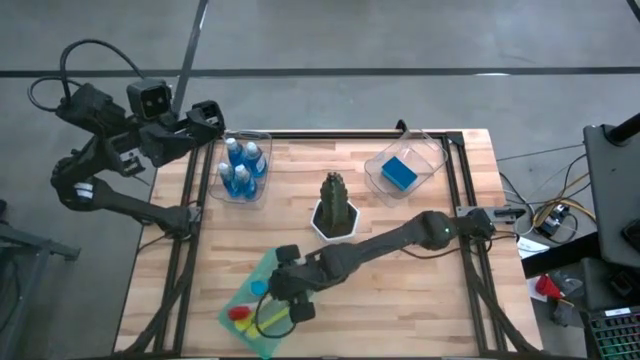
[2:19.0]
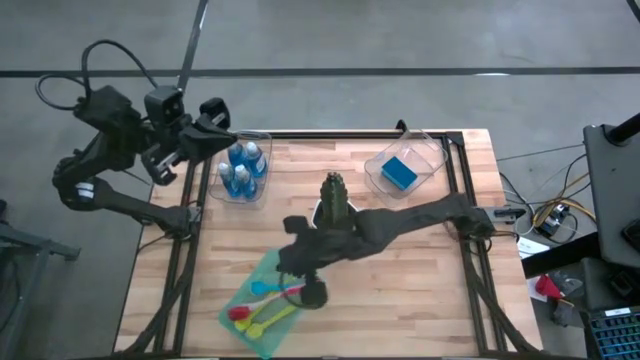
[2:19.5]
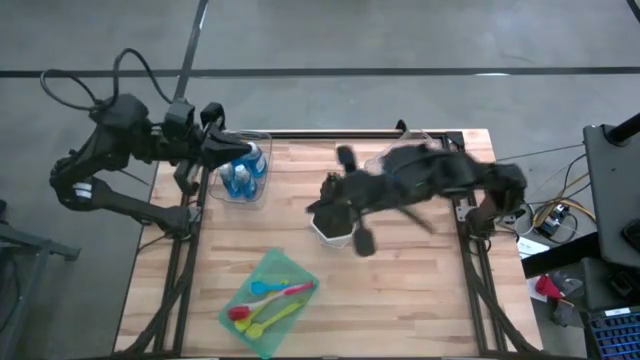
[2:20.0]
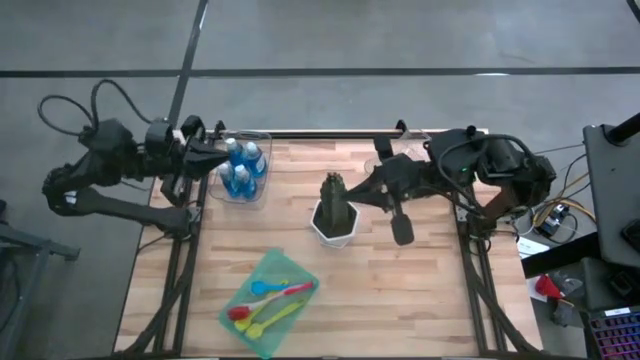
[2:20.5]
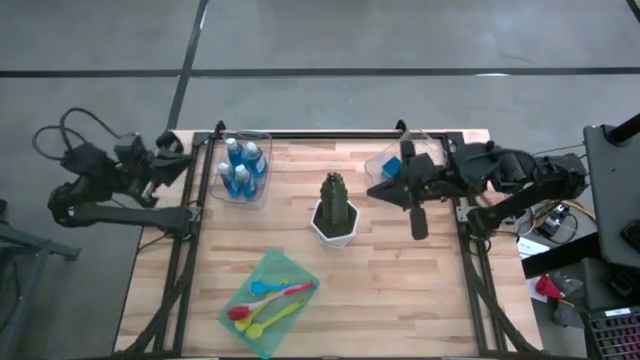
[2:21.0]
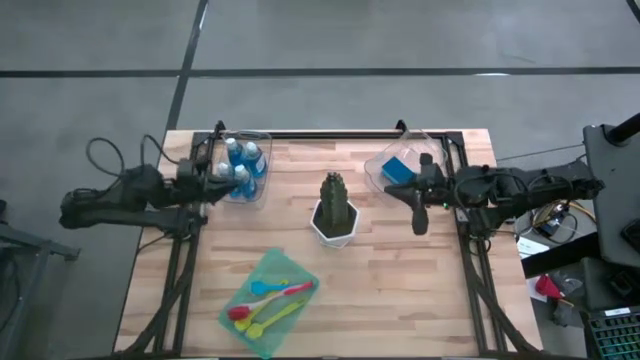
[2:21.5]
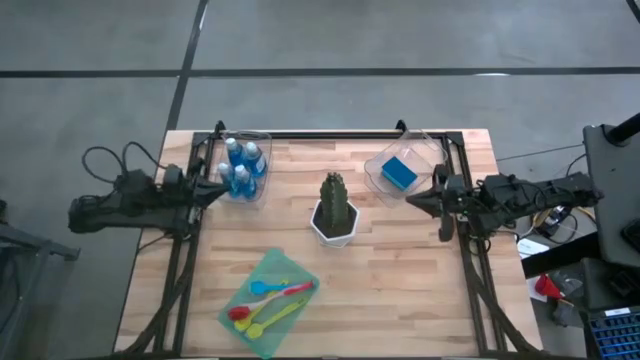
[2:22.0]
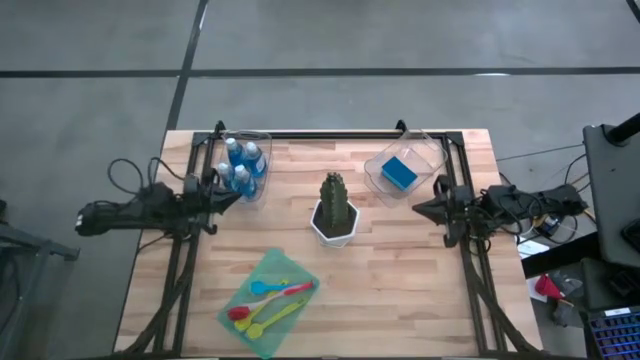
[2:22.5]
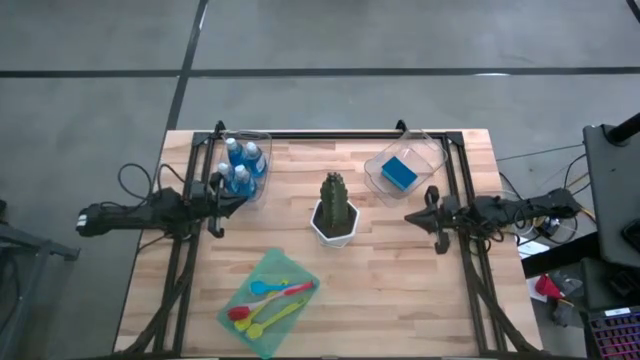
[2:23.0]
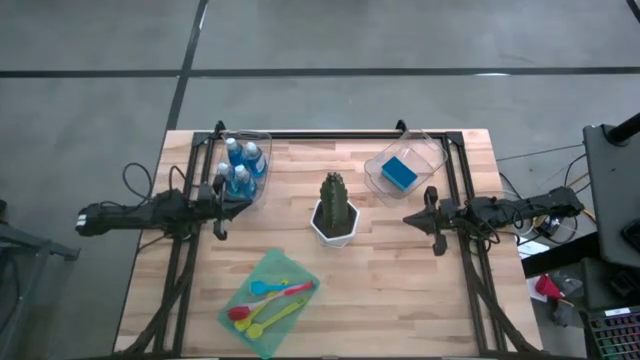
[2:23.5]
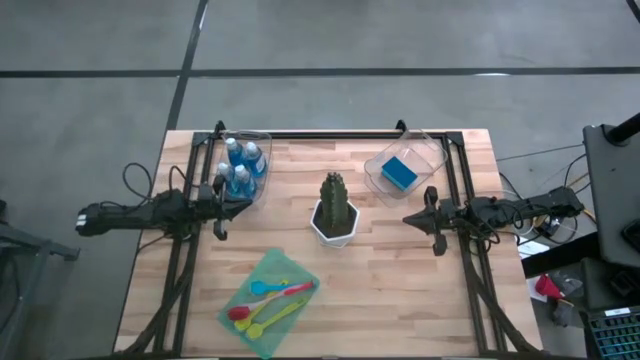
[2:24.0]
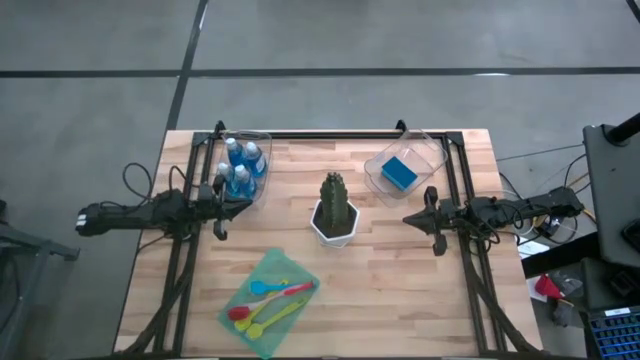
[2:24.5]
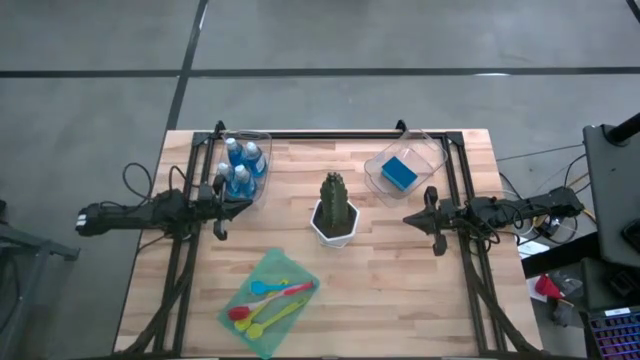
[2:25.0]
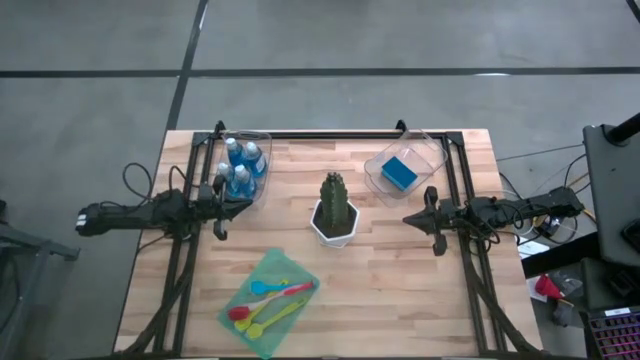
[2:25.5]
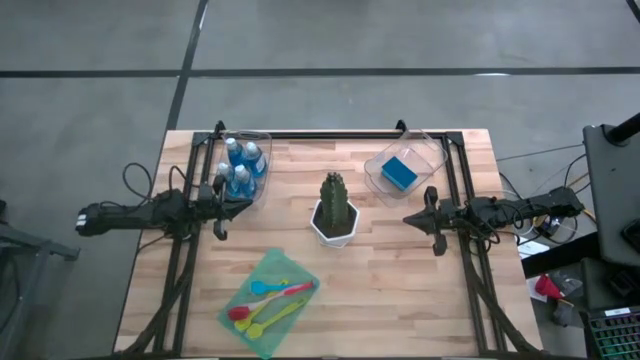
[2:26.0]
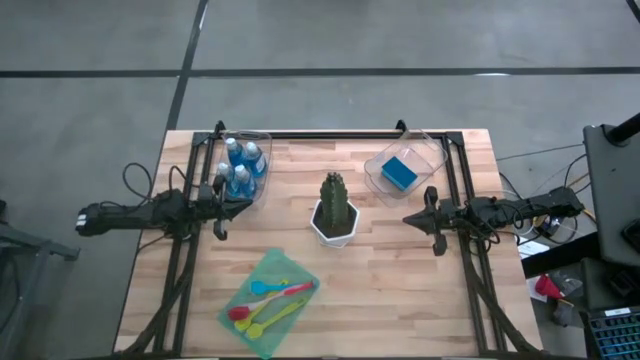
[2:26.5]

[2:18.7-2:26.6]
Task: Pick & Place Kitchen Sink Supplies
Return to Home Position

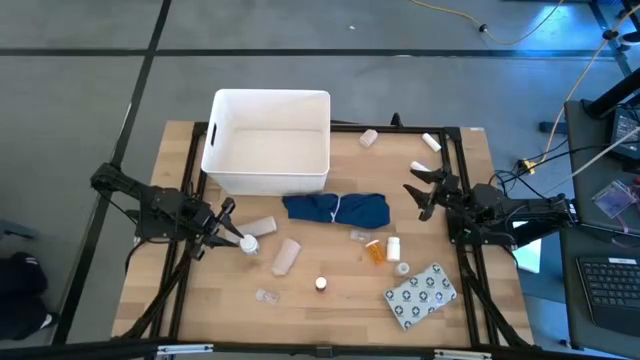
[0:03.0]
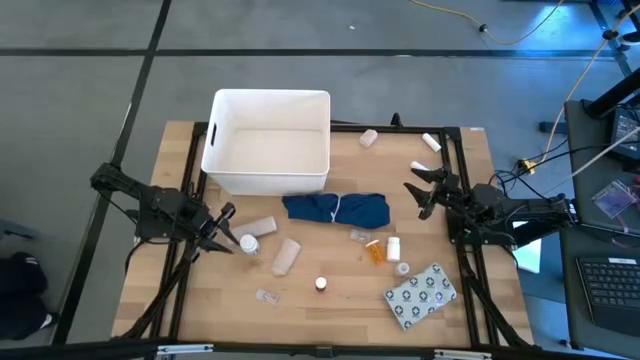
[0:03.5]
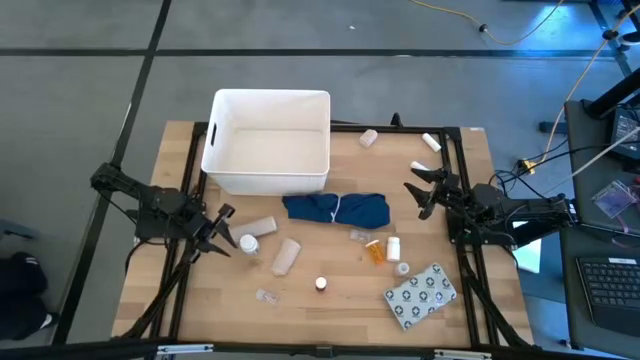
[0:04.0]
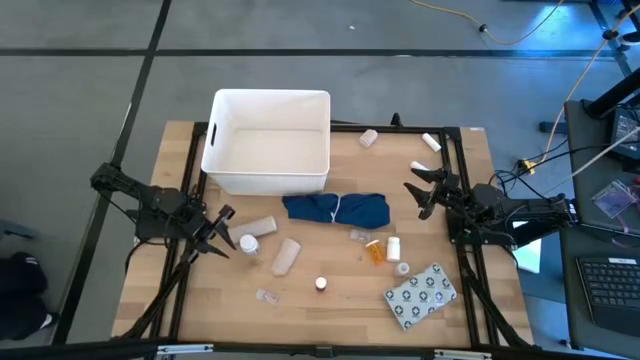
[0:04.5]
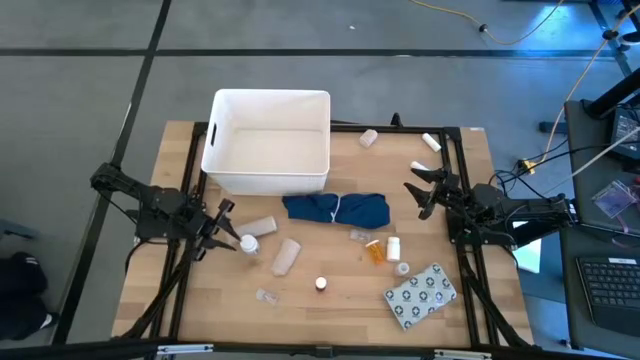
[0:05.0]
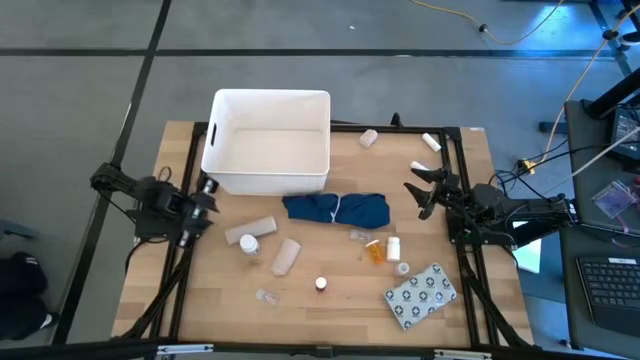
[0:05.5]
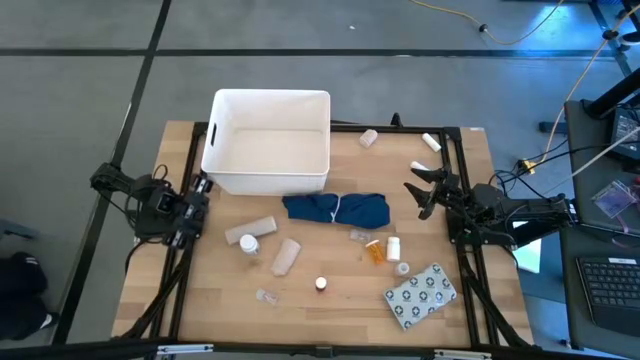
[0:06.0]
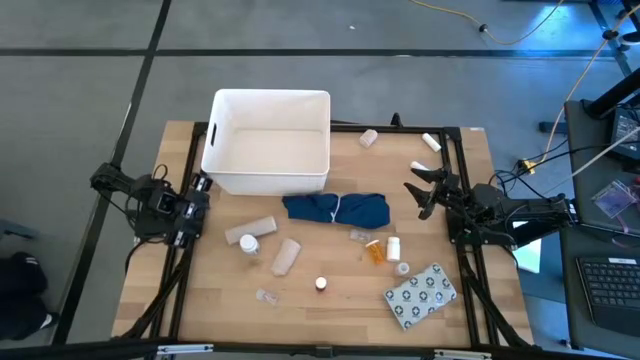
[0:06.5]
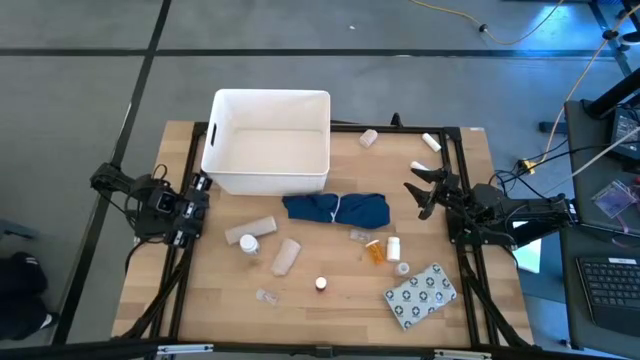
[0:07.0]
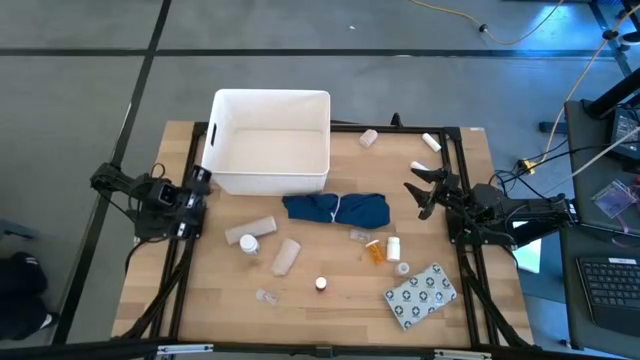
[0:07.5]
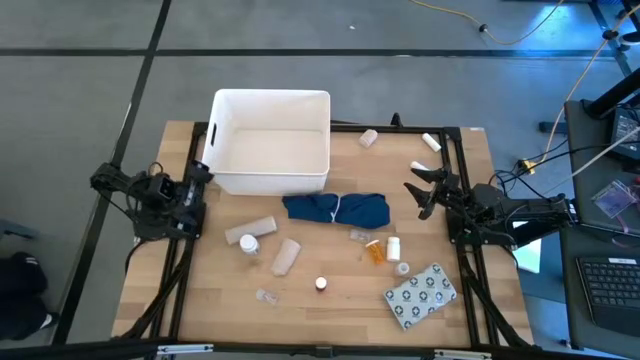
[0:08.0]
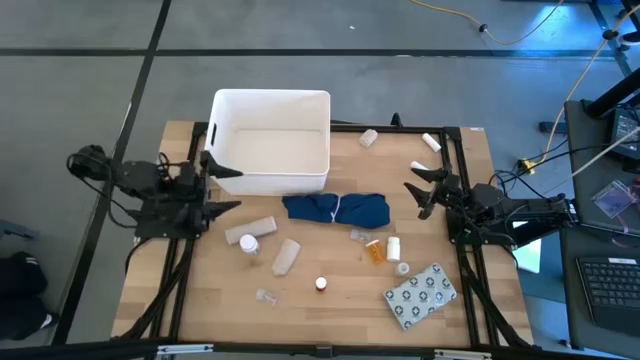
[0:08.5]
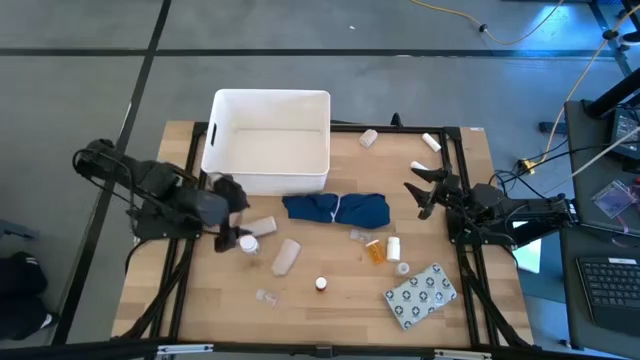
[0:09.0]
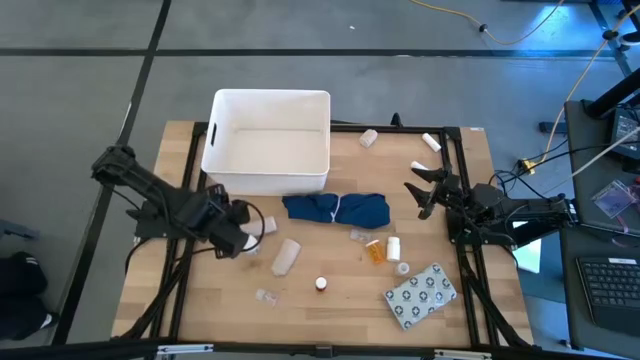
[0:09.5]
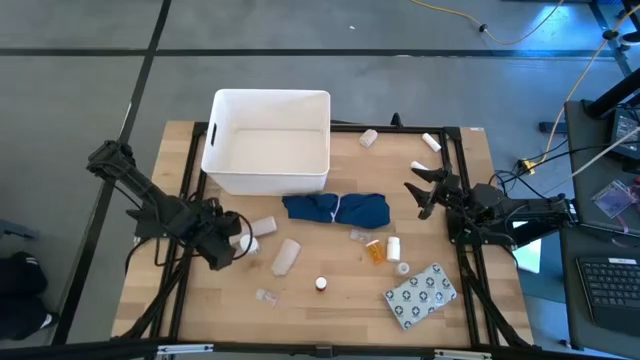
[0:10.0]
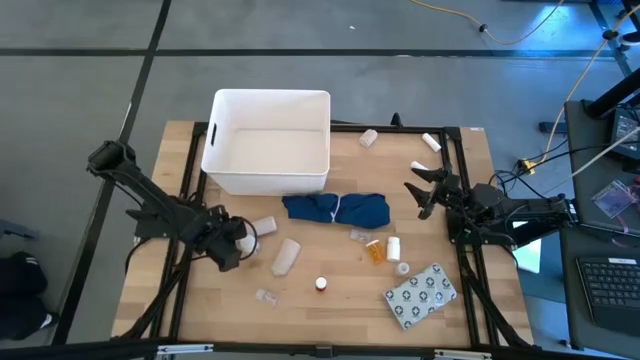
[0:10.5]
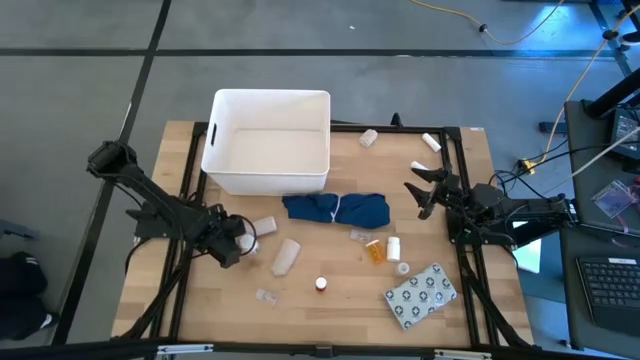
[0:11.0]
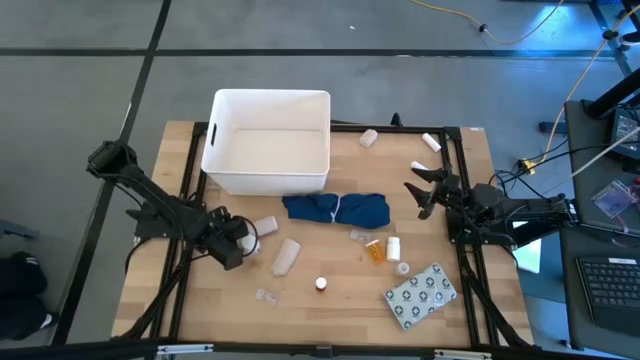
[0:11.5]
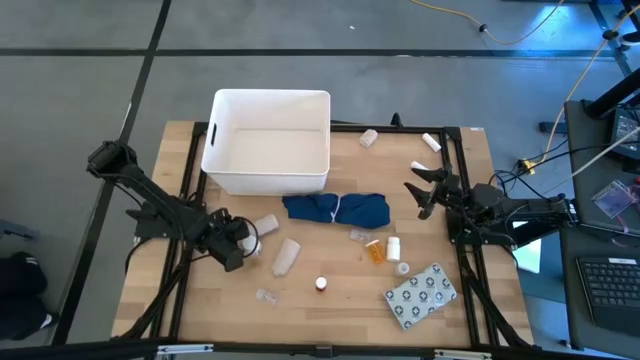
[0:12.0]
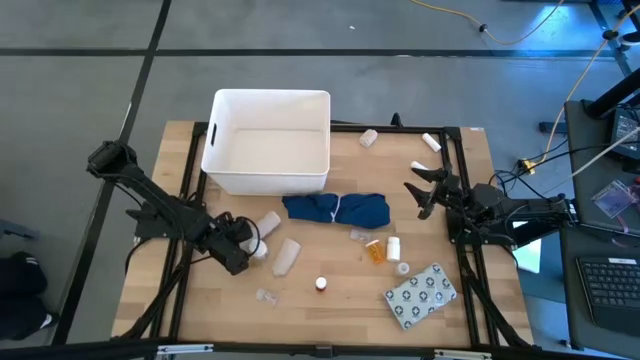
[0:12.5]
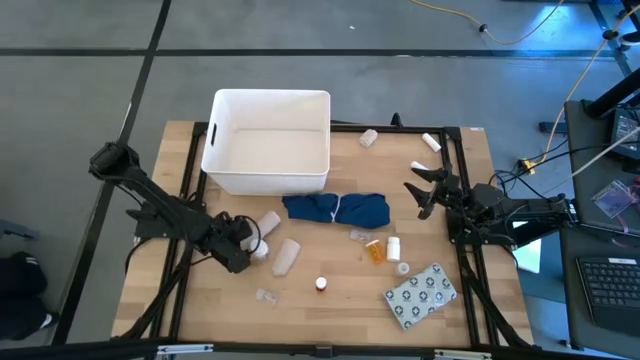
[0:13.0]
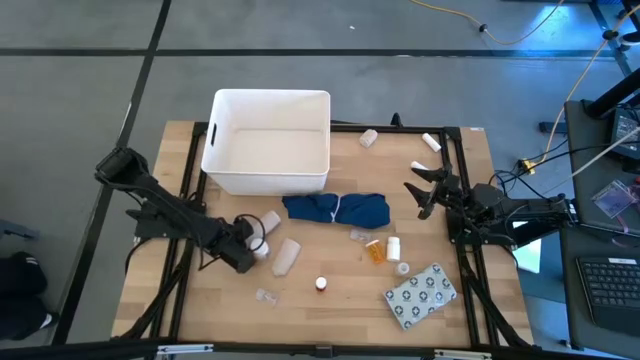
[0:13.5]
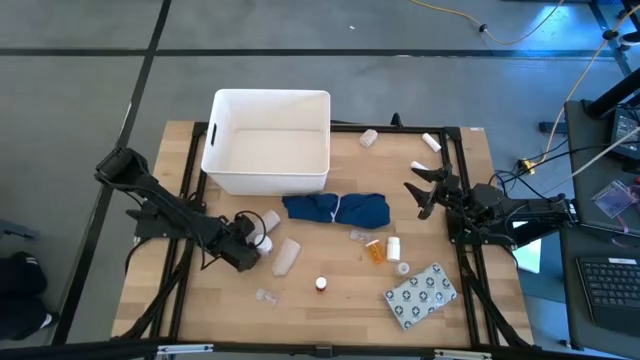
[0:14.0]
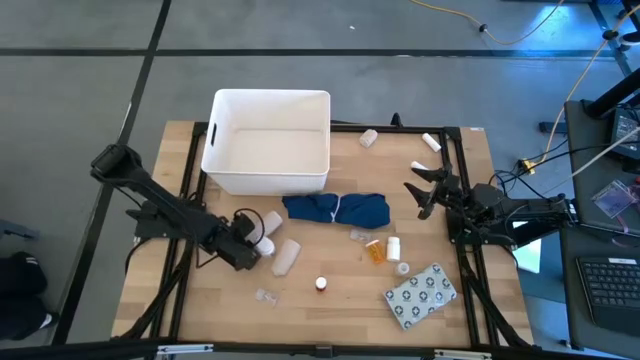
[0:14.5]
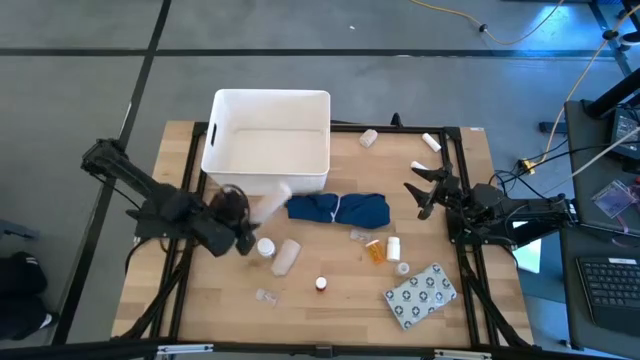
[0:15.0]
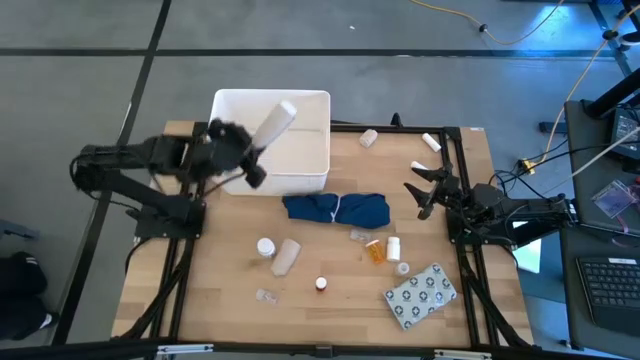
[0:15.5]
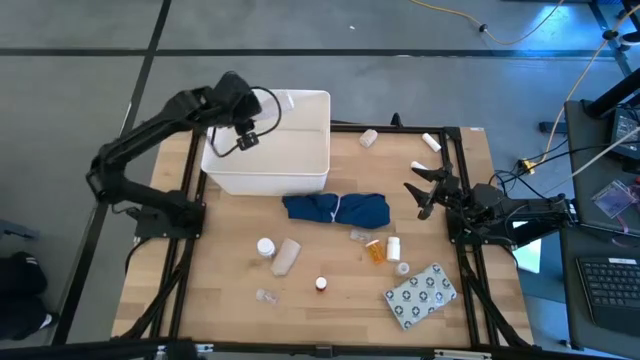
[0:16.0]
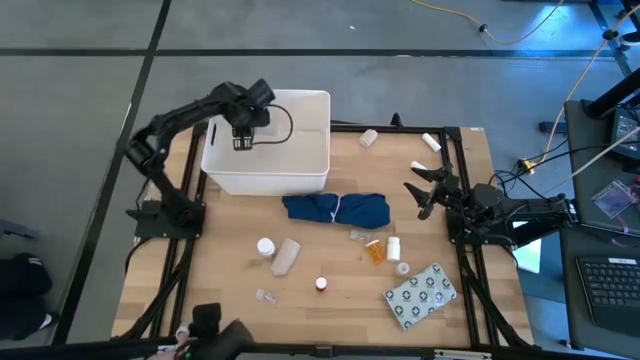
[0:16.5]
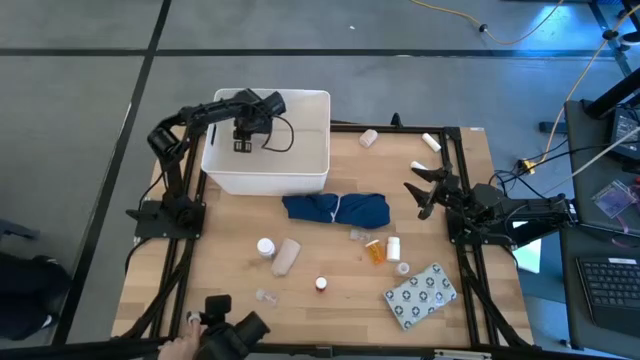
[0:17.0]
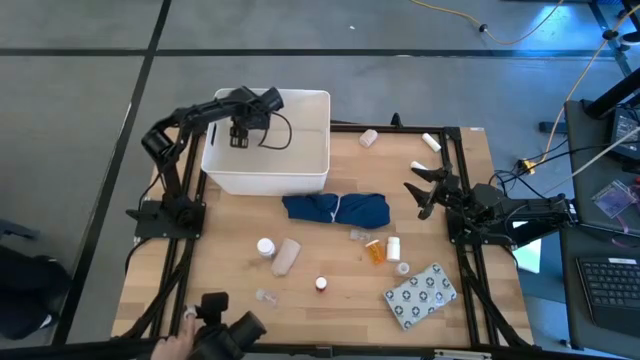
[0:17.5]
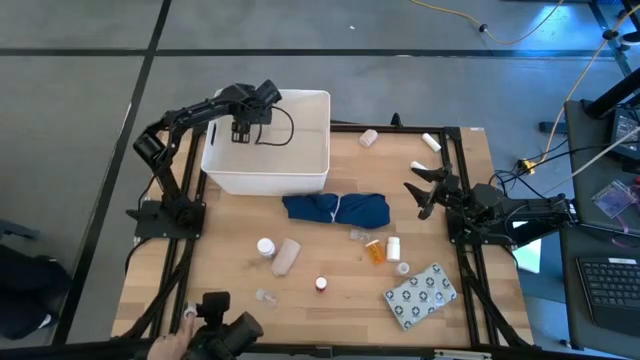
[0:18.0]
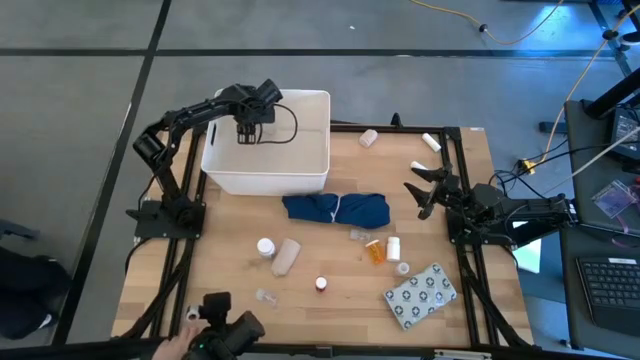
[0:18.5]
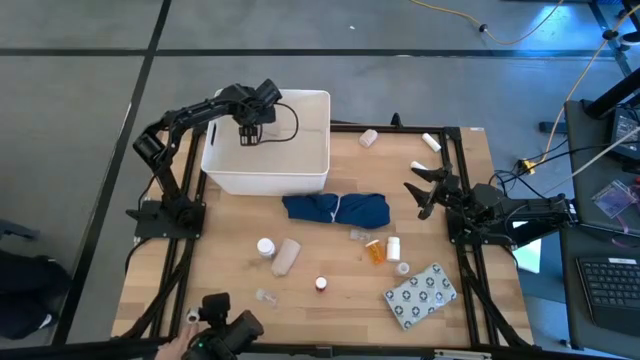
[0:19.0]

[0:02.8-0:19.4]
Task: Pick & place medical supplies in basket/bin
Put the bottom left white bandage into the white container
